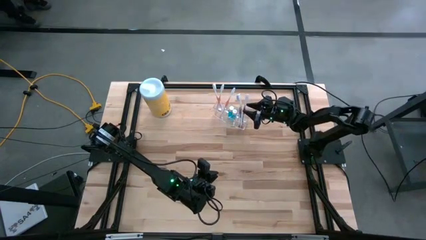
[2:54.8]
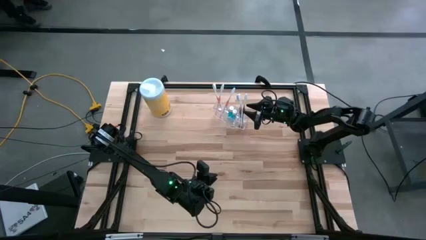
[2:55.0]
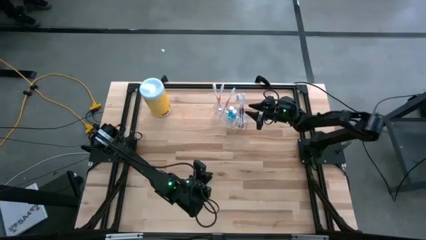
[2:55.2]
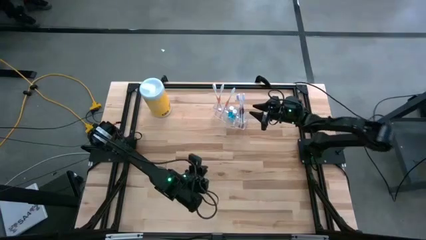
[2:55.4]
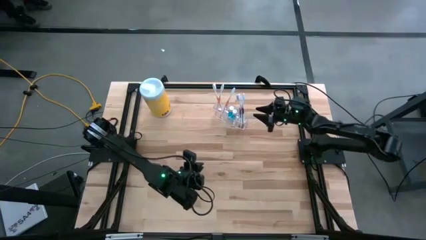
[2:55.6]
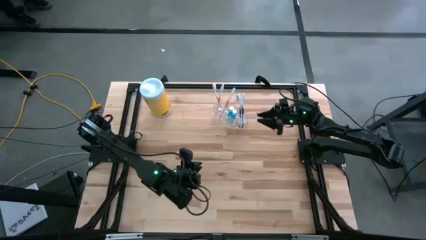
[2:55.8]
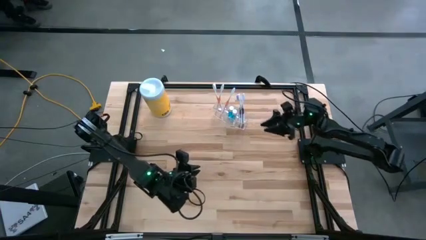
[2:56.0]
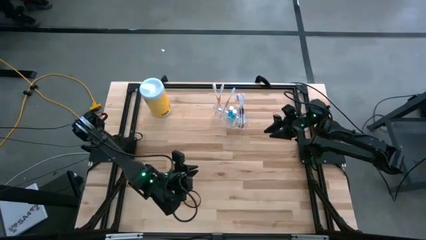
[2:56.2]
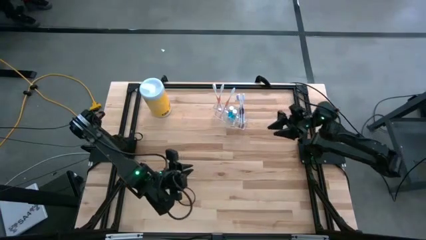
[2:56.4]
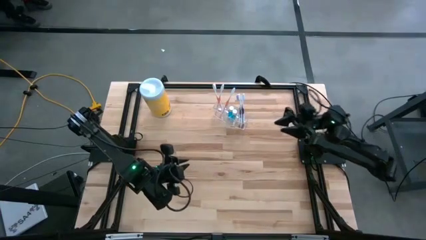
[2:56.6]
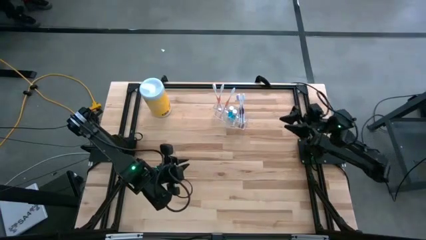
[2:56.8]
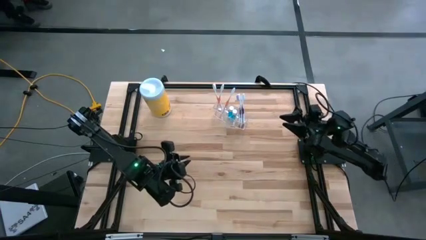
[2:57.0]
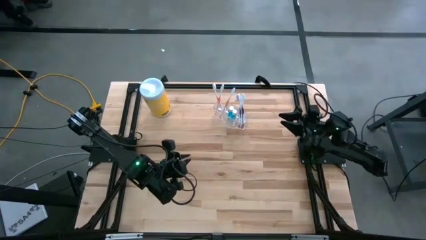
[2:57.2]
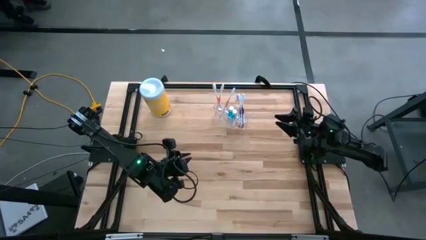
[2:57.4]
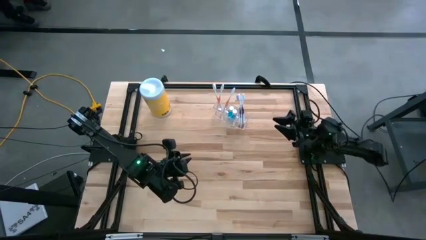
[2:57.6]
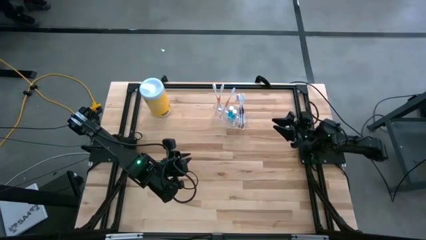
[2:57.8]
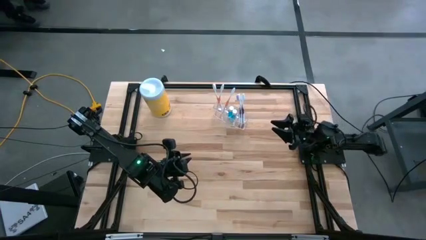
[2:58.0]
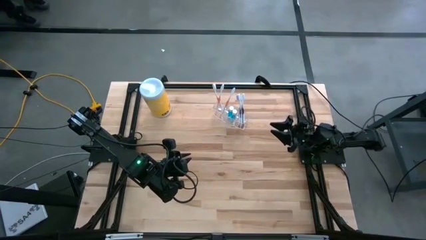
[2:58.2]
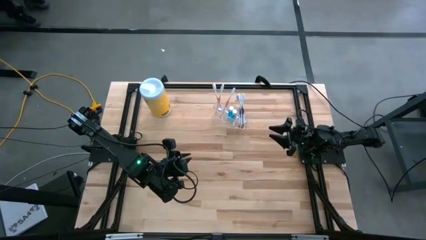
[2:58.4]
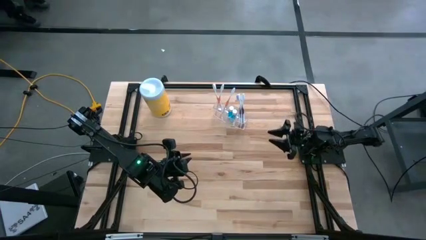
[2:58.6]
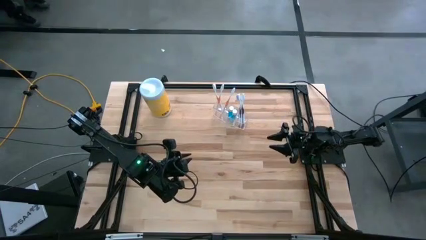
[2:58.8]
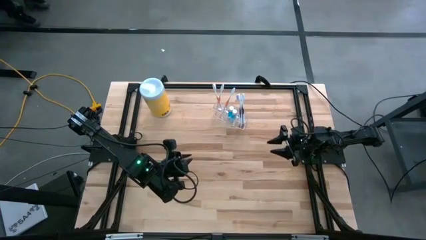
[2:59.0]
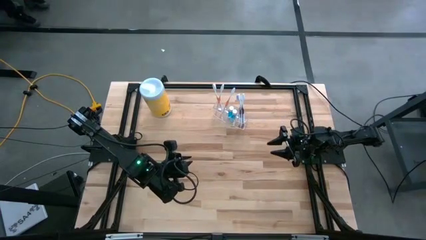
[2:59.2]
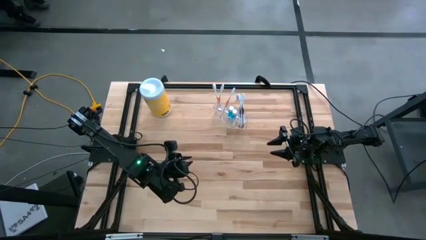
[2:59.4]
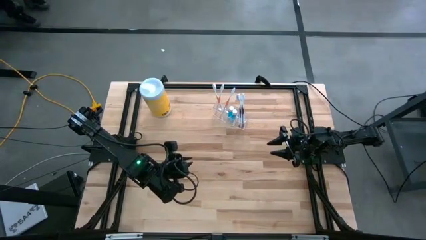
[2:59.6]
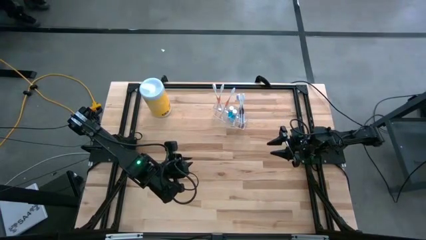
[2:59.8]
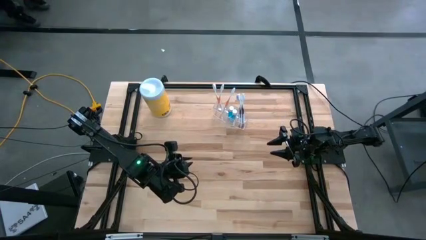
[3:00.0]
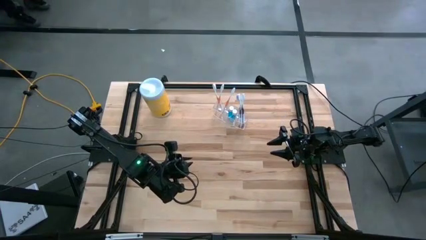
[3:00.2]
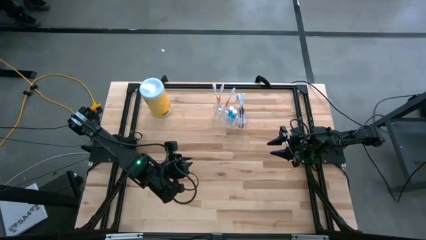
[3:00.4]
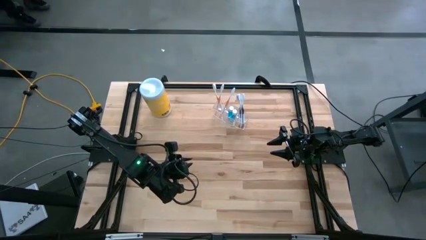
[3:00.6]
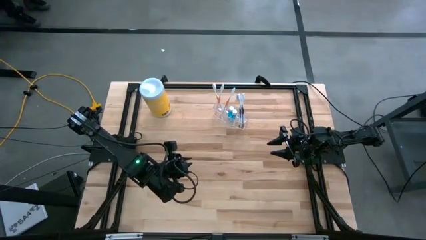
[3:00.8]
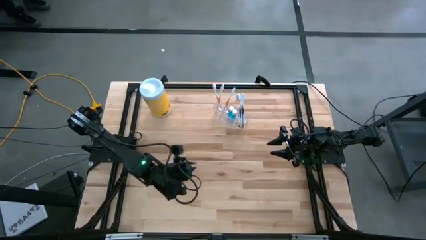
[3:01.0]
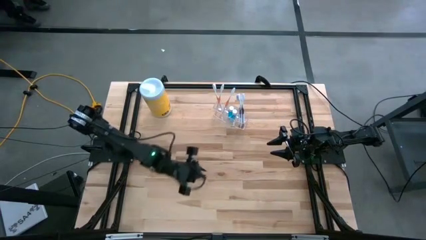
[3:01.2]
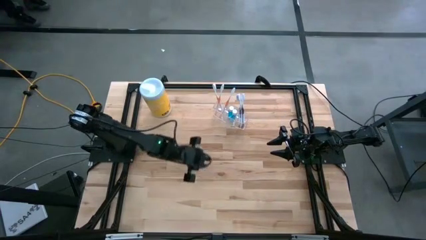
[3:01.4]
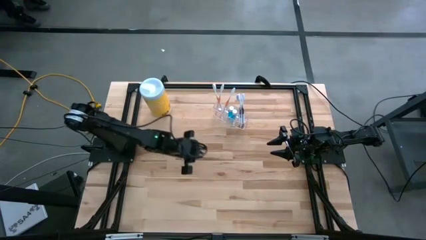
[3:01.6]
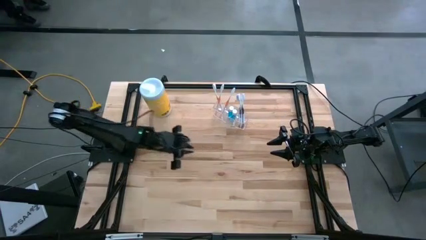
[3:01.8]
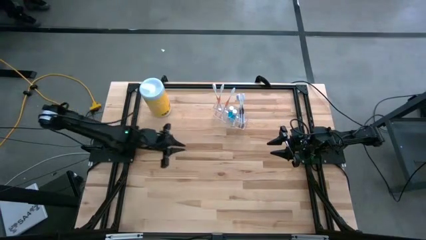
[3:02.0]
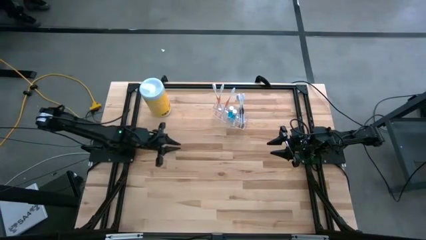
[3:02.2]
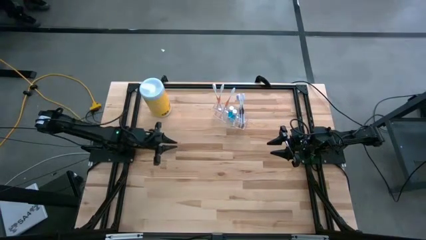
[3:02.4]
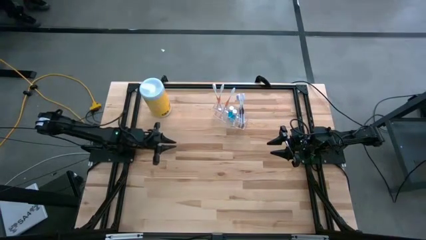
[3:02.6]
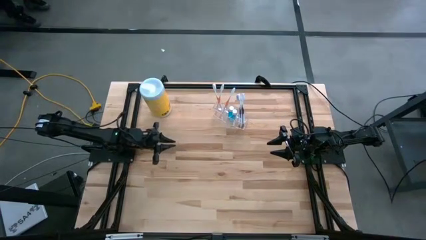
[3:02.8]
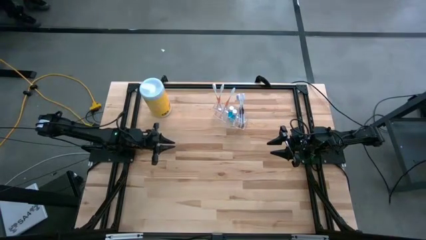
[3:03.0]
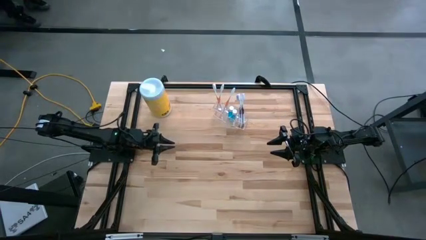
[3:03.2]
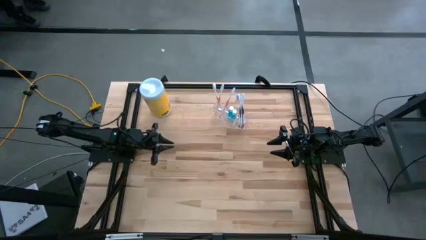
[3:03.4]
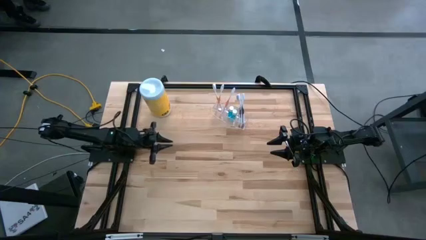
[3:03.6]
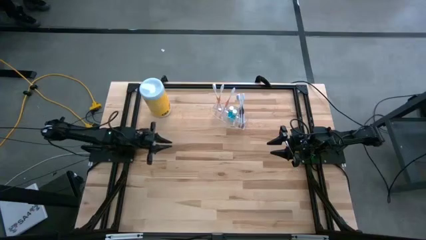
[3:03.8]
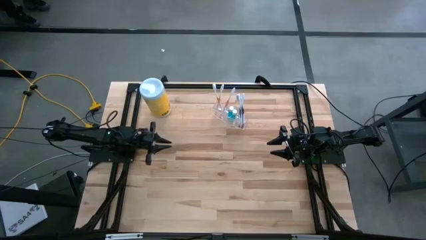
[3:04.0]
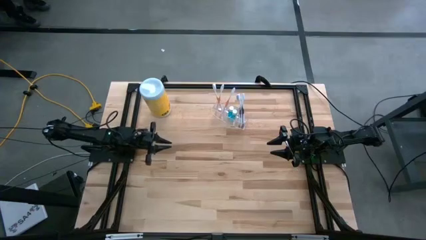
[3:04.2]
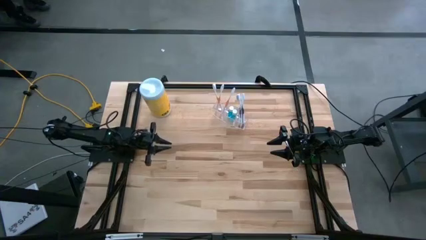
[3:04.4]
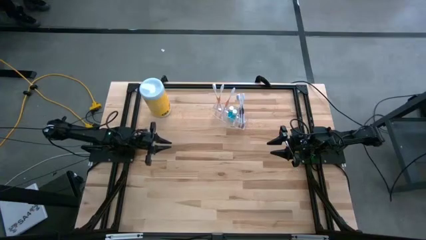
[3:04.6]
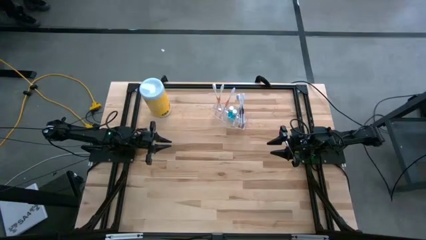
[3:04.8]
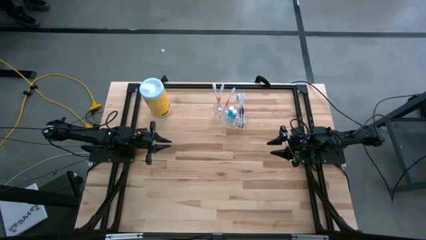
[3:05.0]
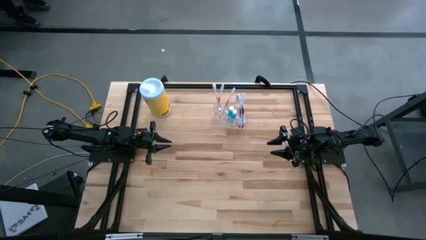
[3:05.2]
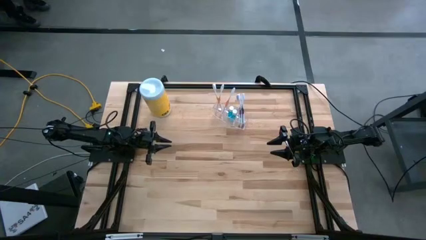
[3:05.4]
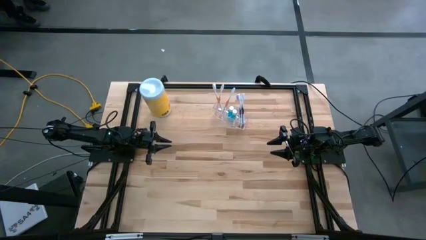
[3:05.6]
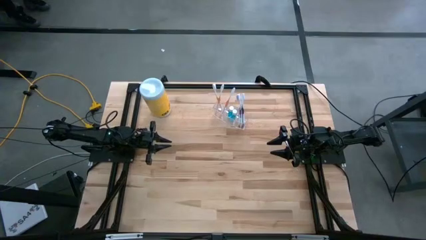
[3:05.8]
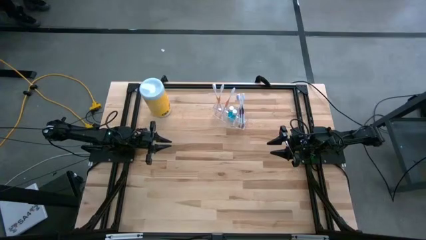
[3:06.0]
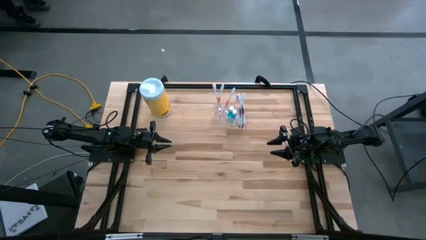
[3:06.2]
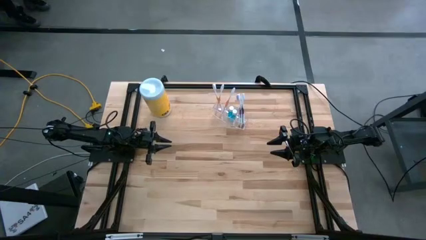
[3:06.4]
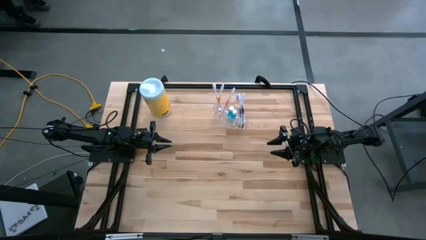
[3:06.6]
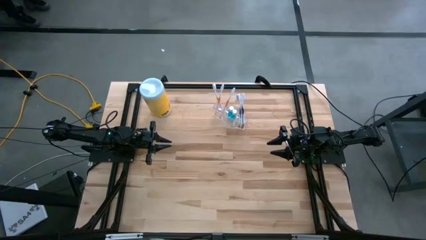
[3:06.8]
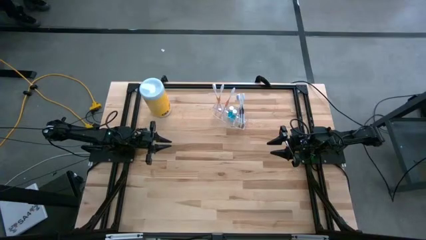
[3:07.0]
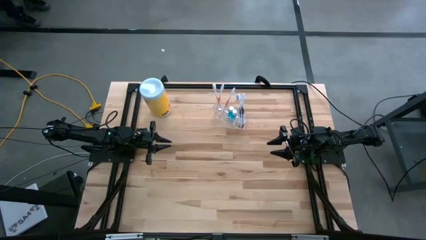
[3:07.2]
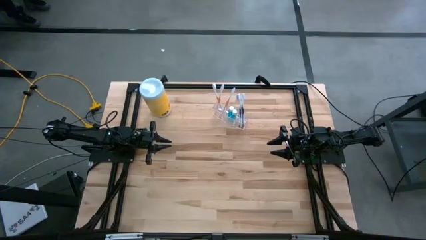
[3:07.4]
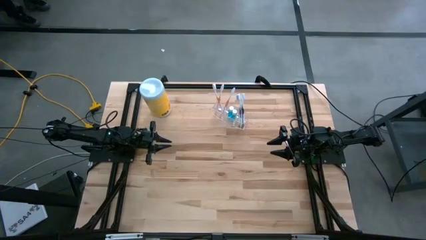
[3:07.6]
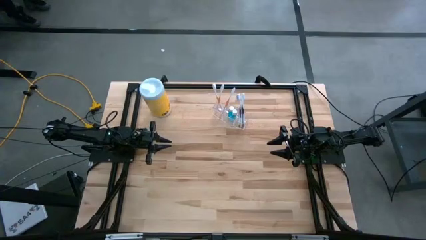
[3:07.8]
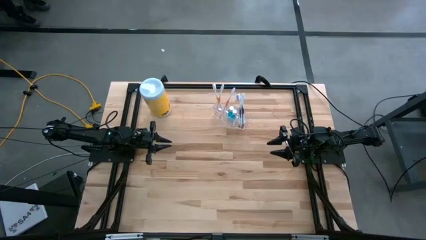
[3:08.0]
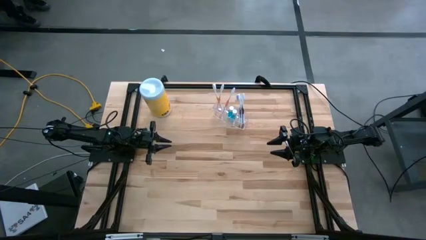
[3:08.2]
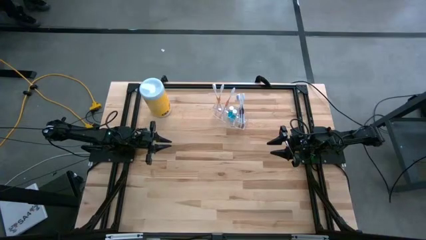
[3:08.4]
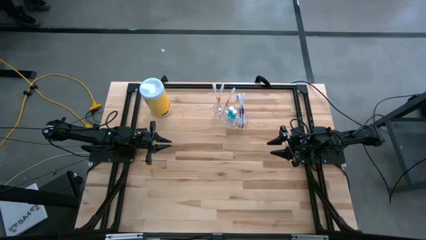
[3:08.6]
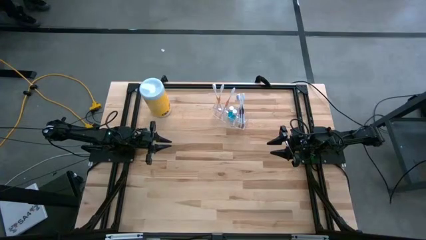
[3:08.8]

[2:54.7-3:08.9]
Task: Pick & Place toothbrushing station
Return to Home Position
